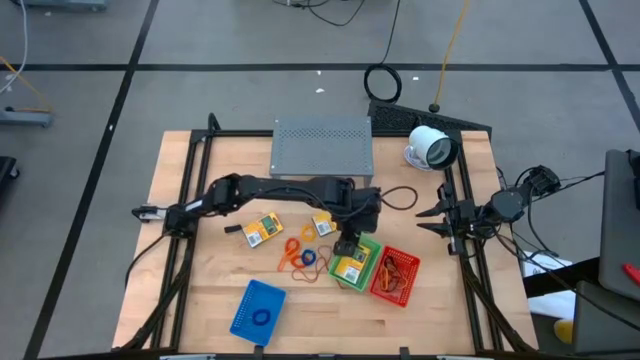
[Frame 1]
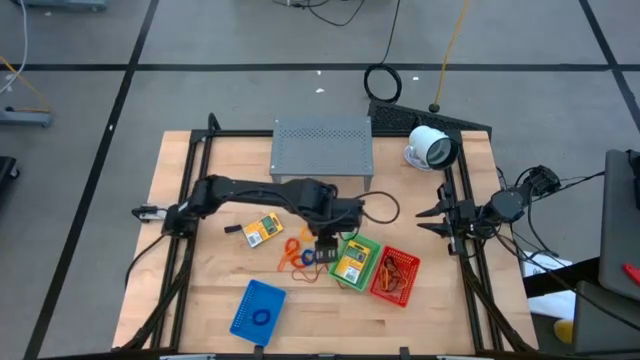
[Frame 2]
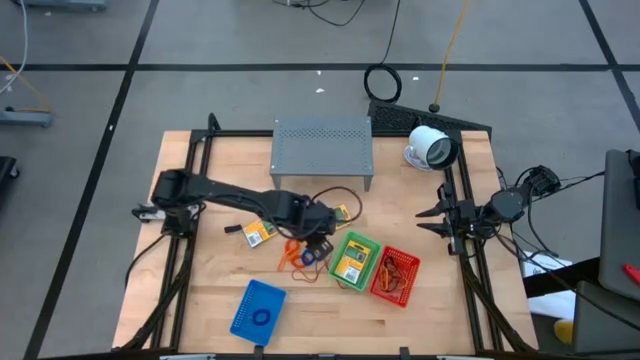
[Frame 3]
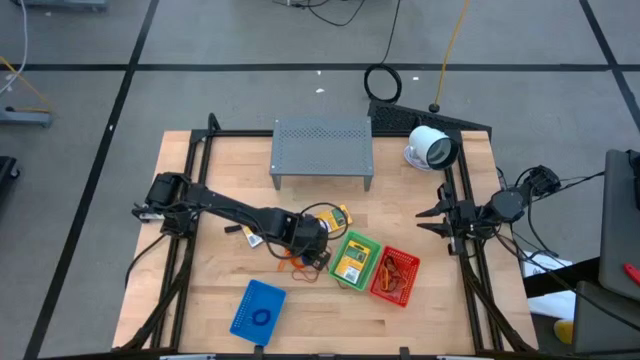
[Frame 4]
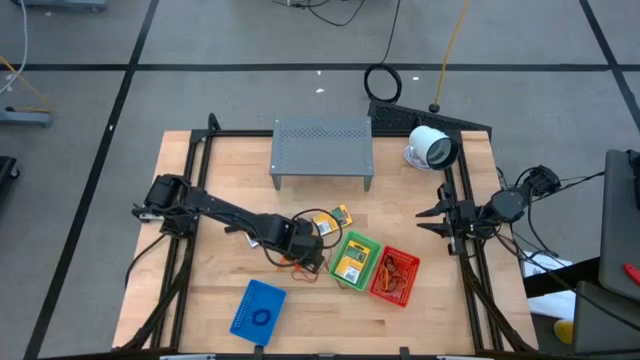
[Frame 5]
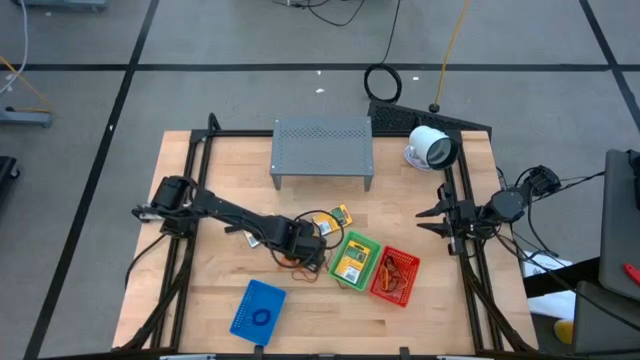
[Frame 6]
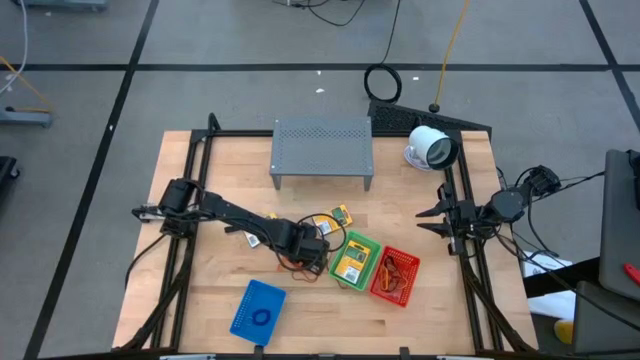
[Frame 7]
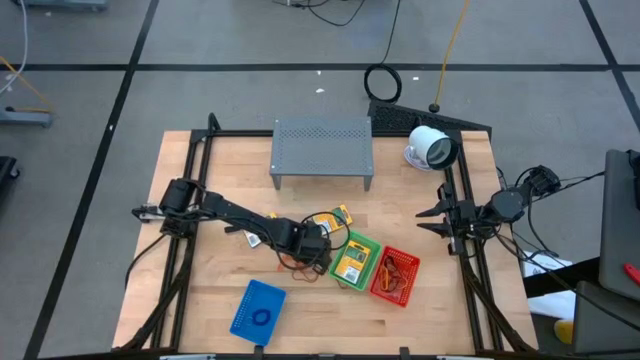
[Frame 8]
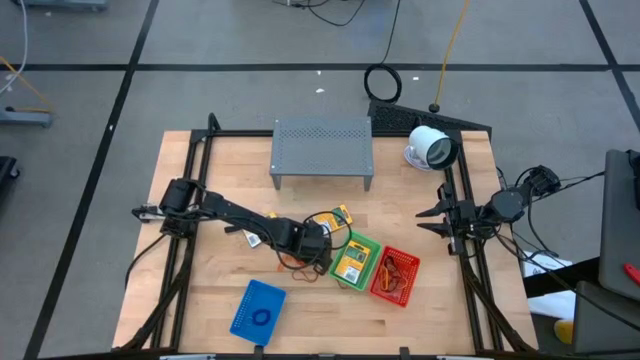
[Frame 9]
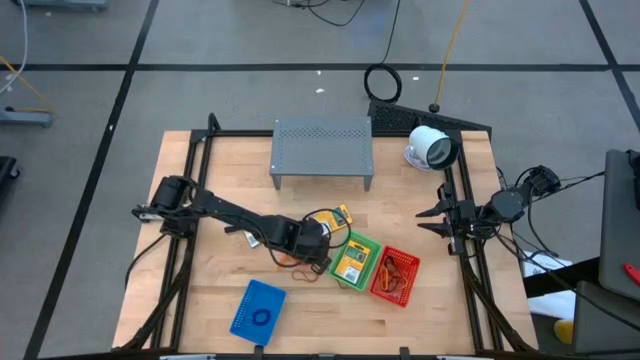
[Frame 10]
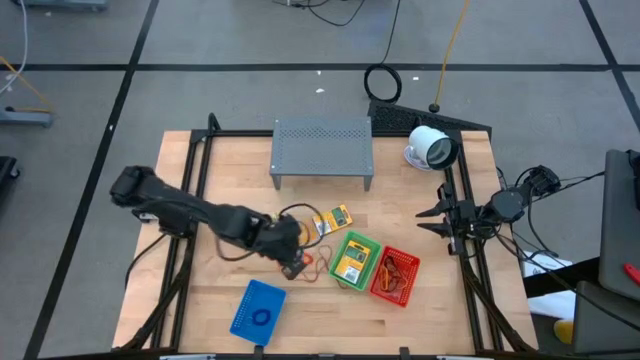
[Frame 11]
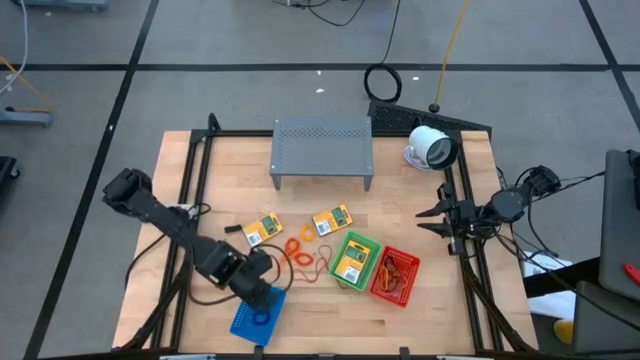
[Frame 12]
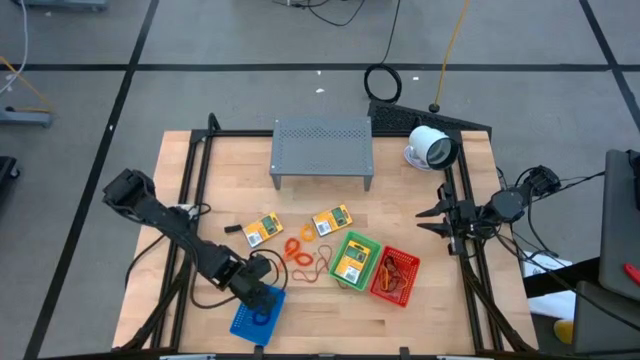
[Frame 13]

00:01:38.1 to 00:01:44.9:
Task: Pick & Place Office Desk Supplies
Put the blue spring rubberband band into the blue bin

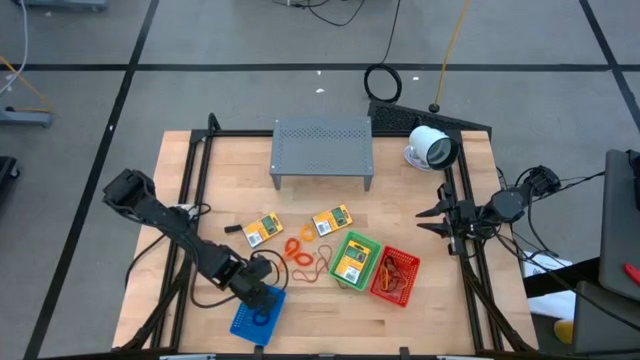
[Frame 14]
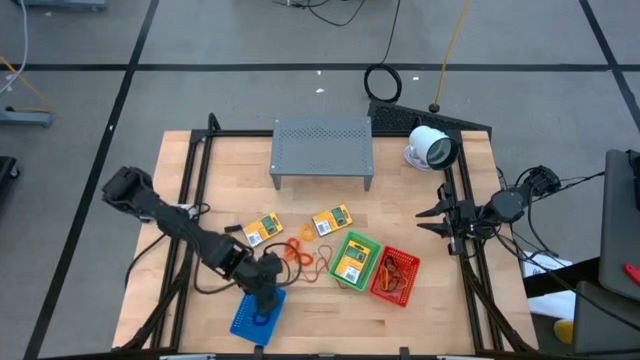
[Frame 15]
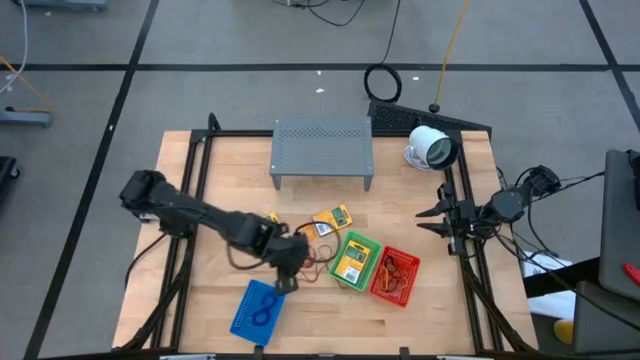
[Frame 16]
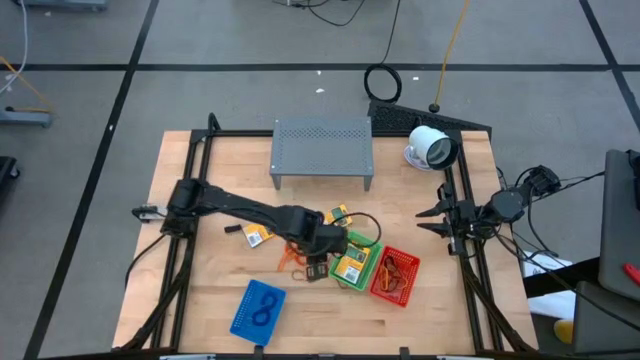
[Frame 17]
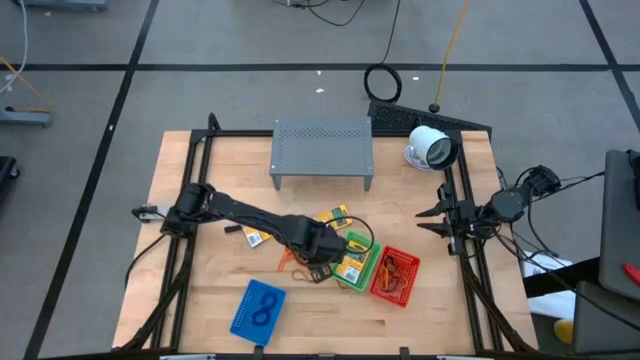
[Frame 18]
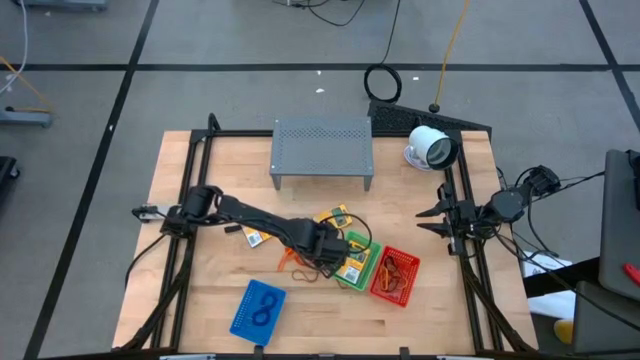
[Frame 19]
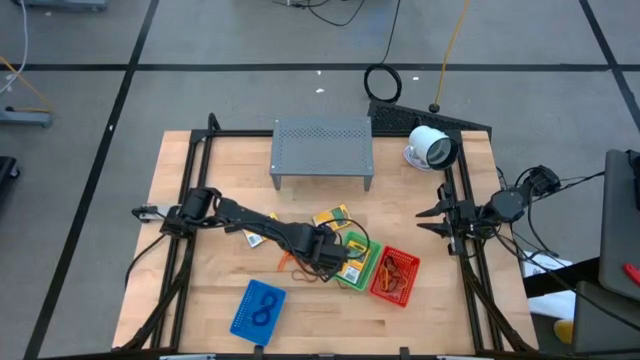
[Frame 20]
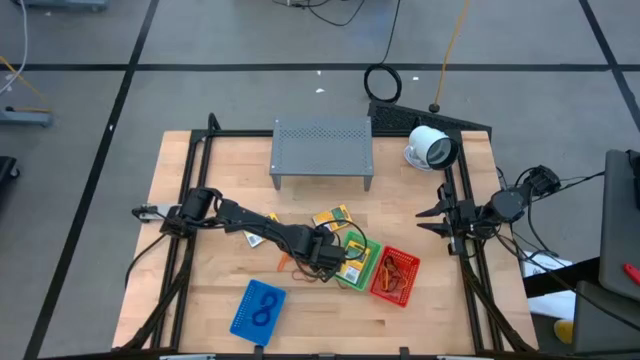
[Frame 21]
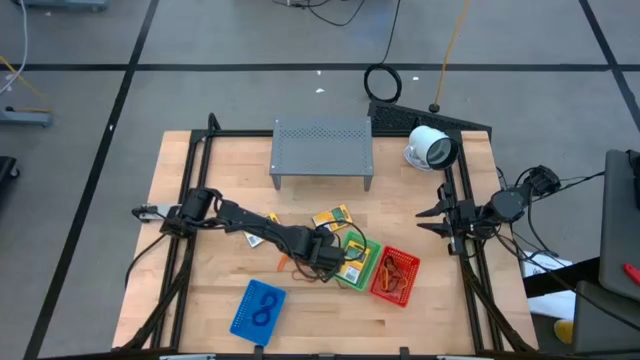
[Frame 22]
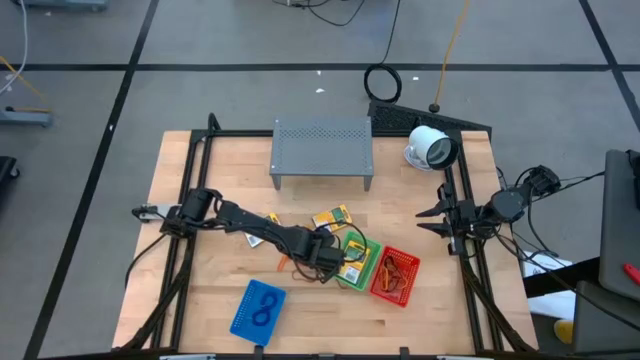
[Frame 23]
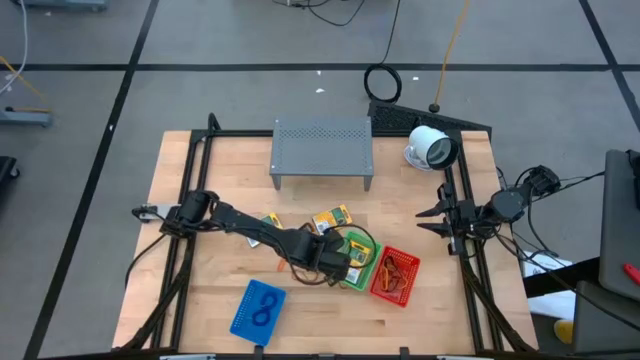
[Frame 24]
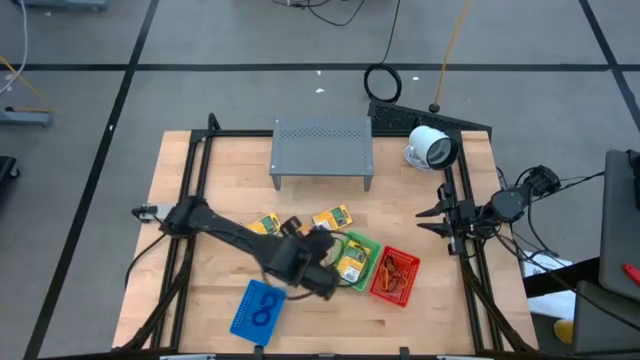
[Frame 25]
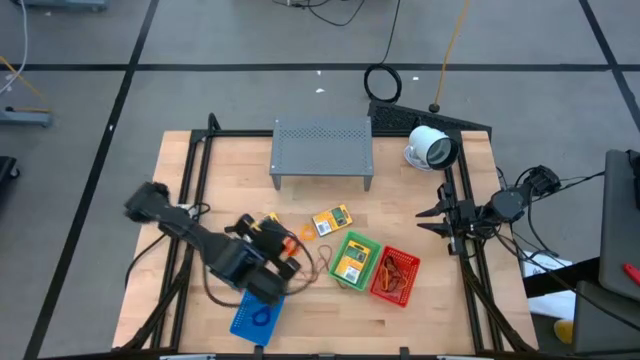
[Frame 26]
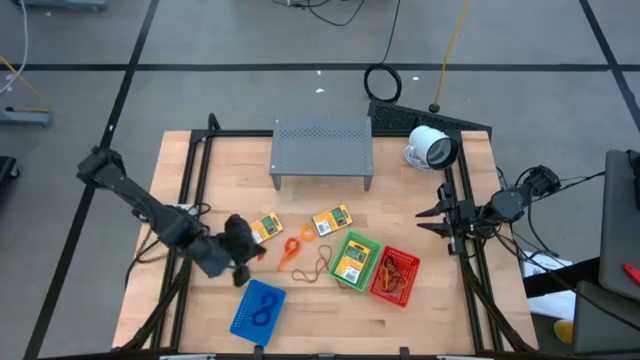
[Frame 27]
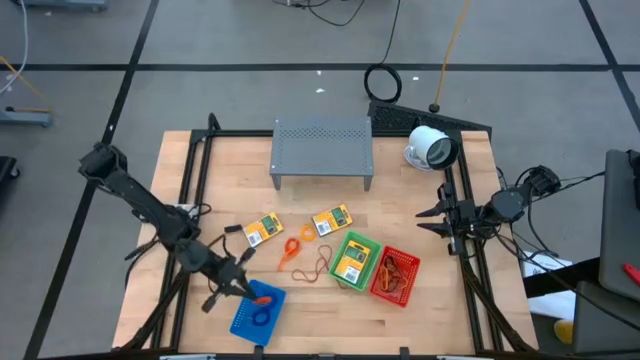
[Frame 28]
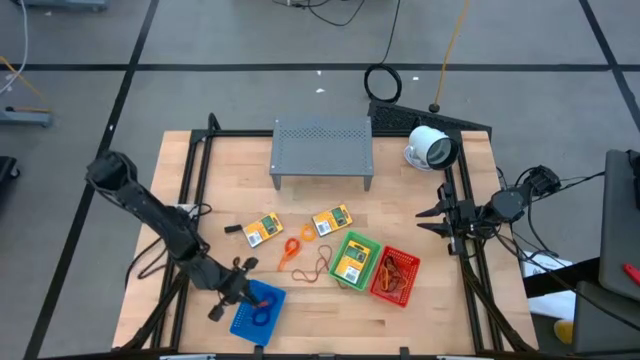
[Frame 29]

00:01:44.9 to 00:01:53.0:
Put the orange spring rubberband band into the blue bin

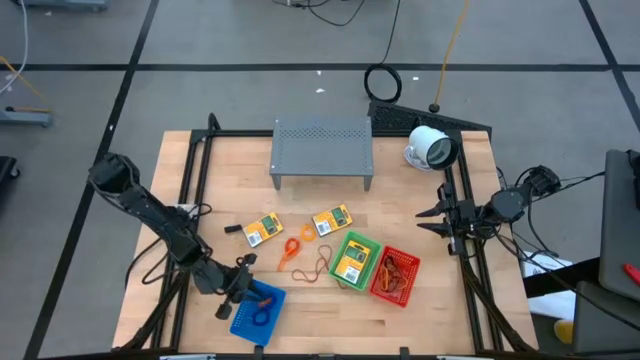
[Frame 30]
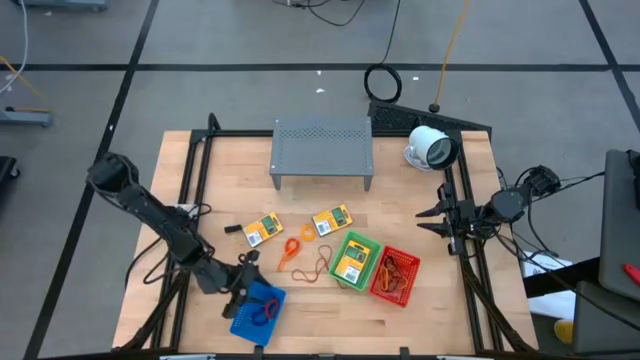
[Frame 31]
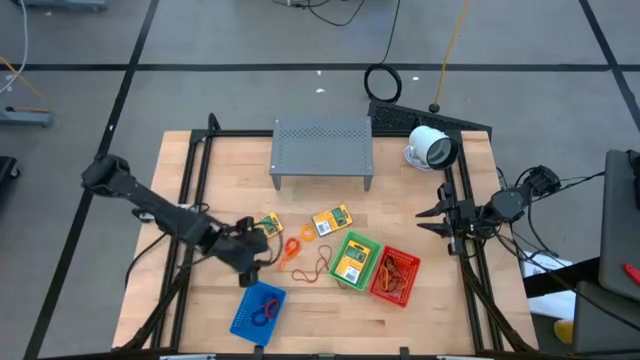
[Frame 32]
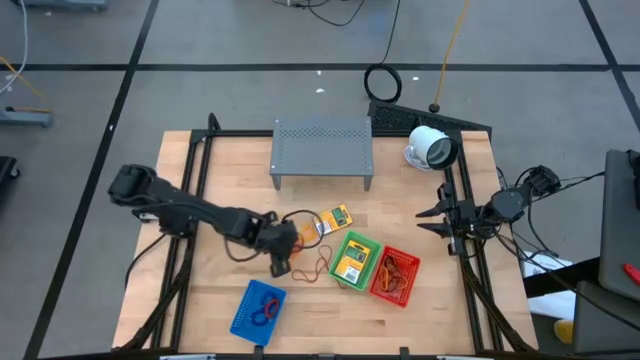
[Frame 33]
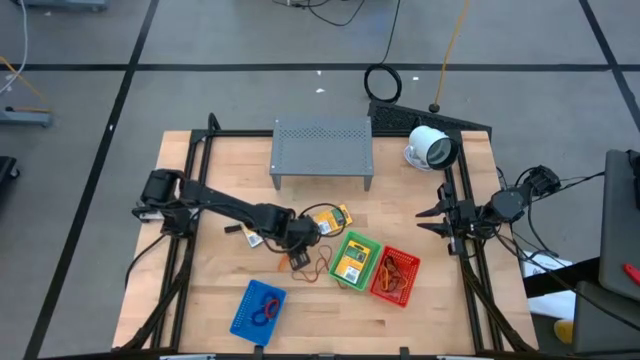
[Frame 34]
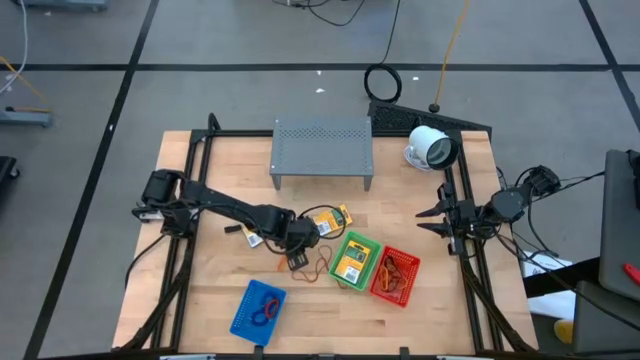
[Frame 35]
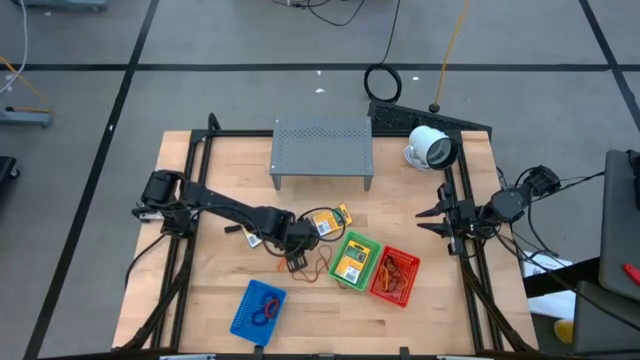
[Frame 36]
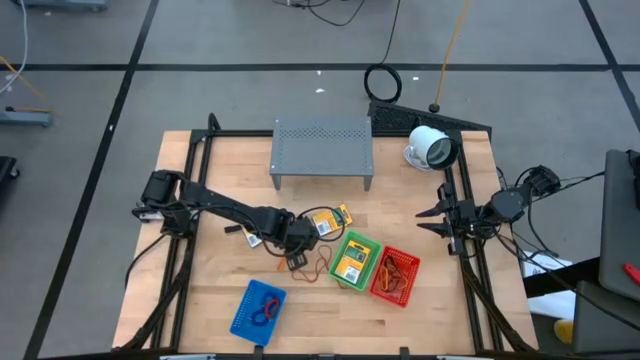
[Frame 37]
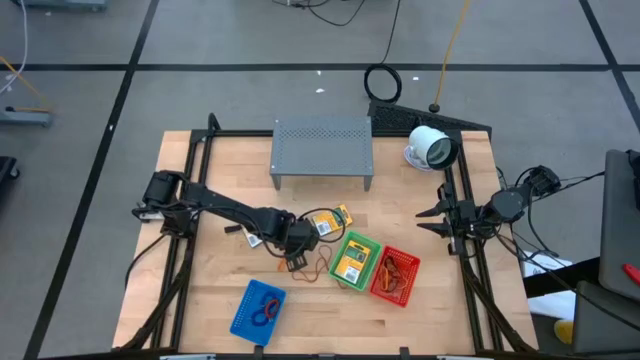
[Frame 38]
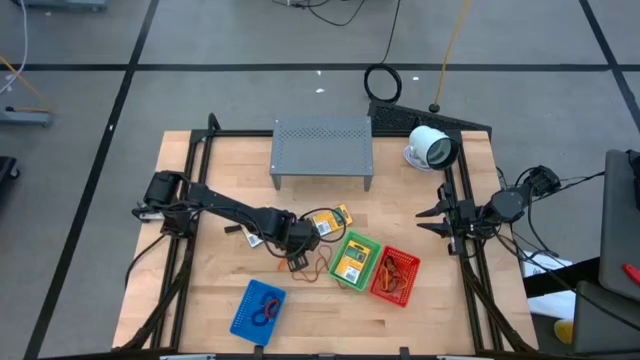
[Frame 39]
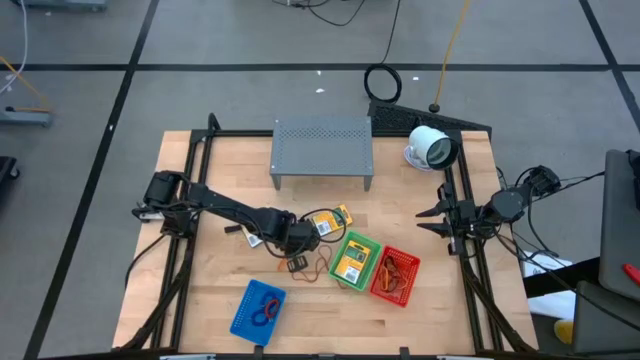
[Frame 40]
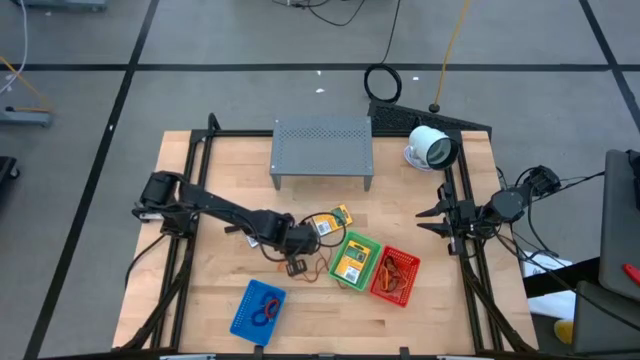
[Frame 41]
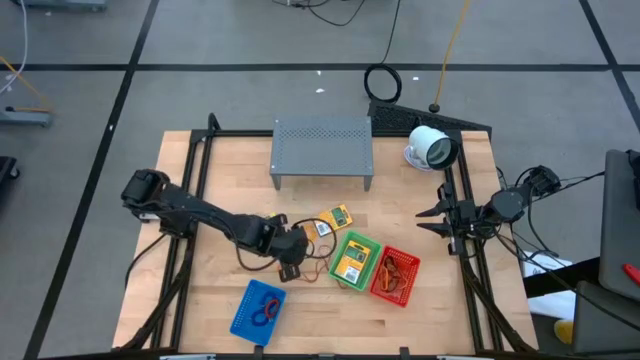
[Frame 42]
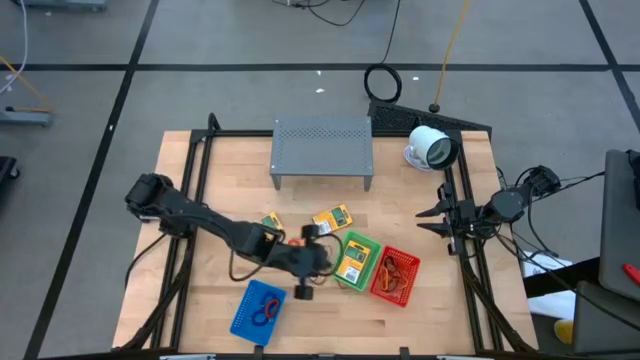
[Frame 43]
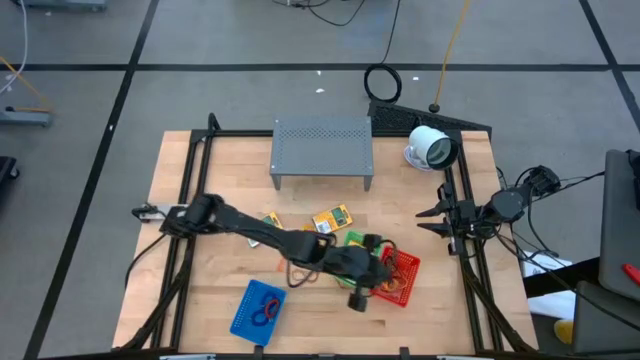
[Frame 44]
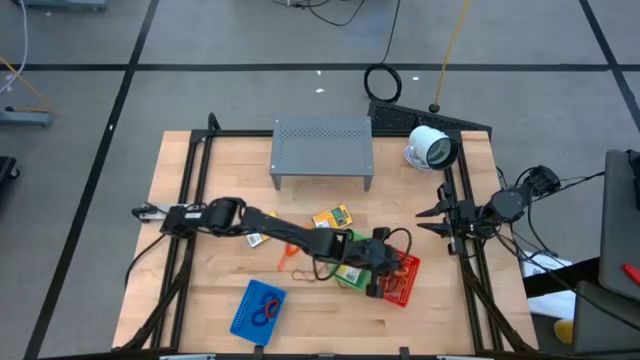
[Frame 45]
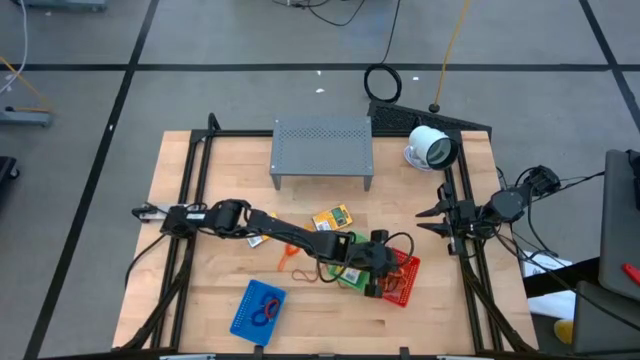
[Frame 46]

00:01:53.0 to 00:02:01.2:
Put the orange rubber band into the red bin
